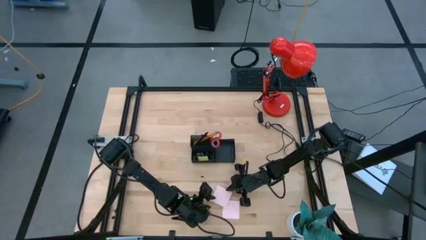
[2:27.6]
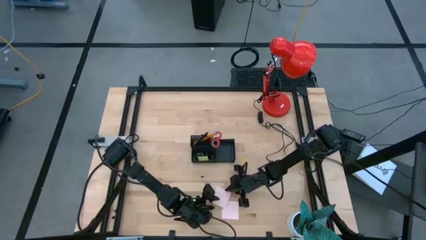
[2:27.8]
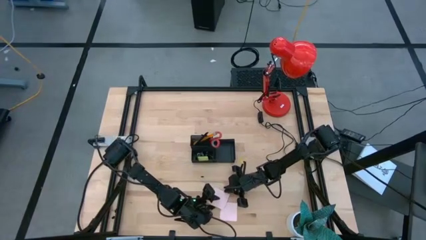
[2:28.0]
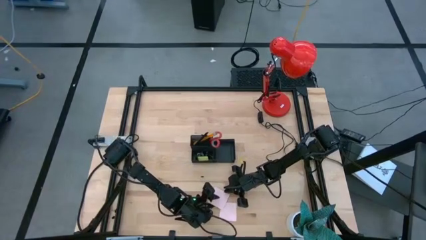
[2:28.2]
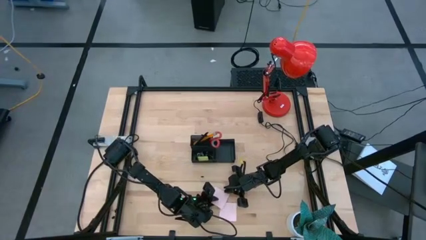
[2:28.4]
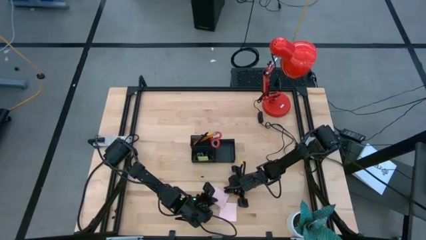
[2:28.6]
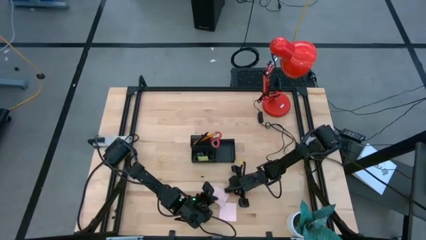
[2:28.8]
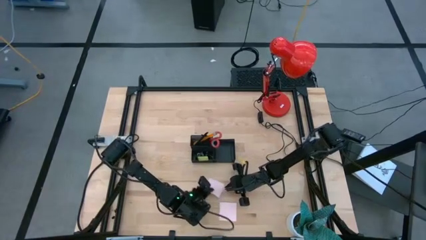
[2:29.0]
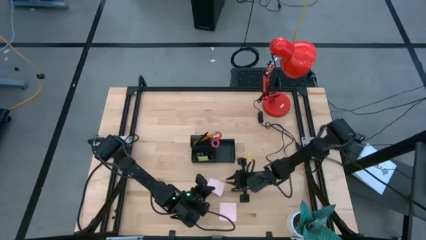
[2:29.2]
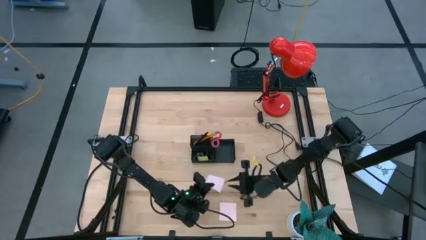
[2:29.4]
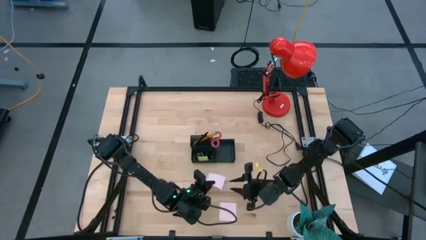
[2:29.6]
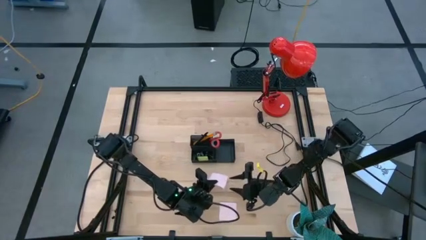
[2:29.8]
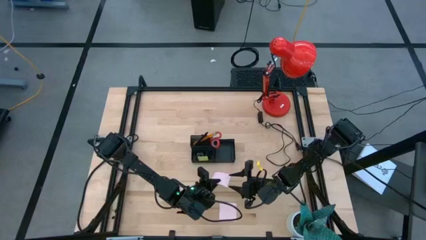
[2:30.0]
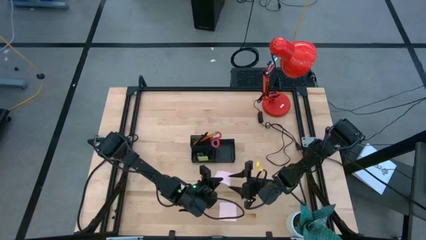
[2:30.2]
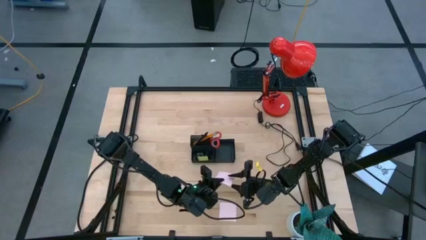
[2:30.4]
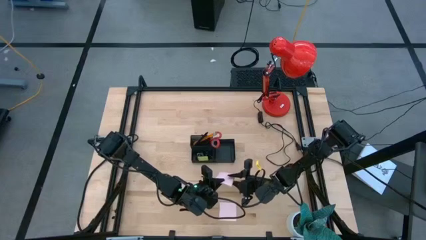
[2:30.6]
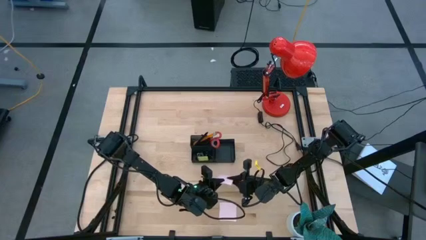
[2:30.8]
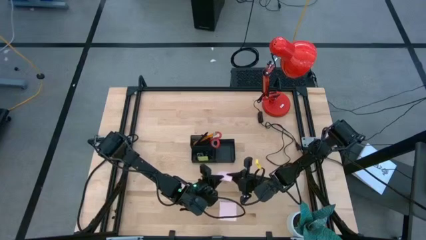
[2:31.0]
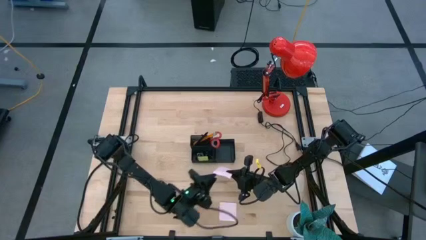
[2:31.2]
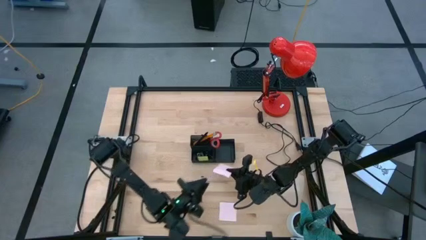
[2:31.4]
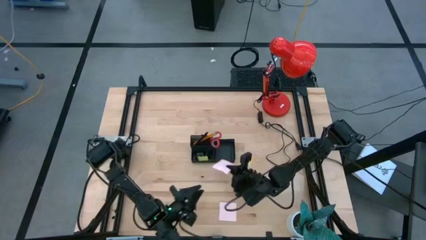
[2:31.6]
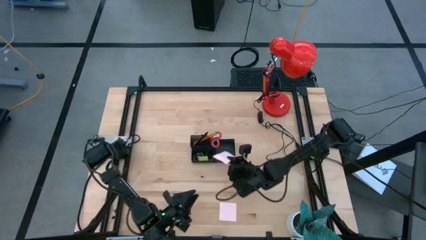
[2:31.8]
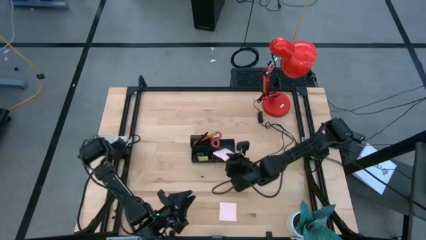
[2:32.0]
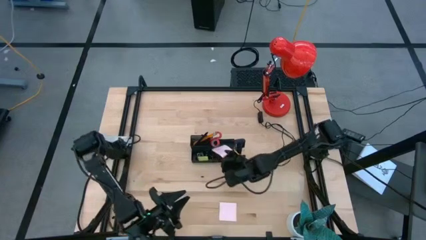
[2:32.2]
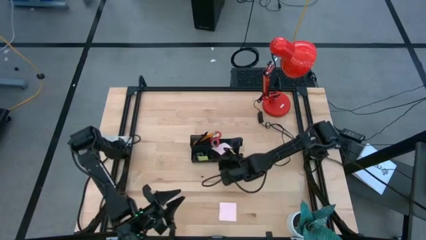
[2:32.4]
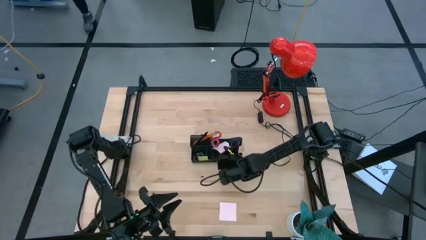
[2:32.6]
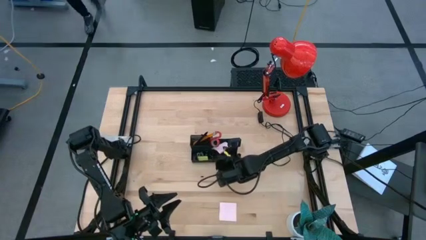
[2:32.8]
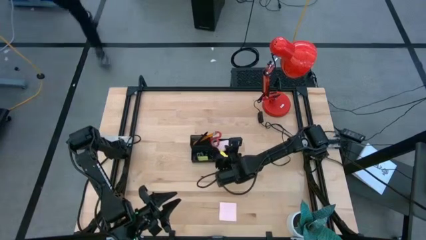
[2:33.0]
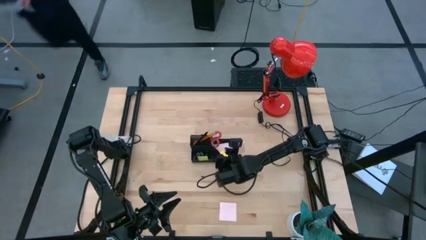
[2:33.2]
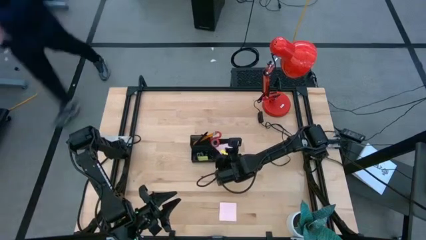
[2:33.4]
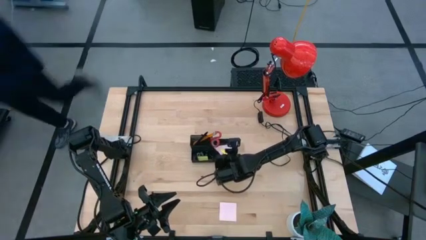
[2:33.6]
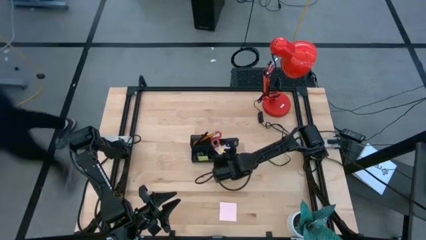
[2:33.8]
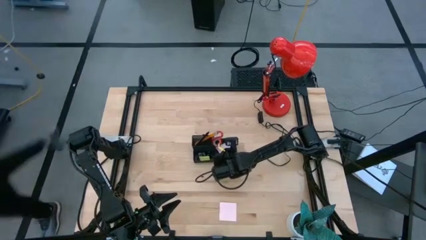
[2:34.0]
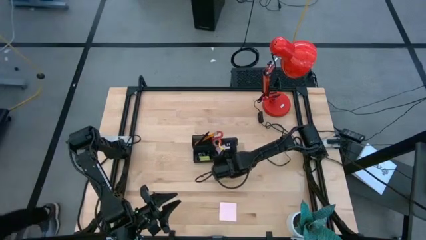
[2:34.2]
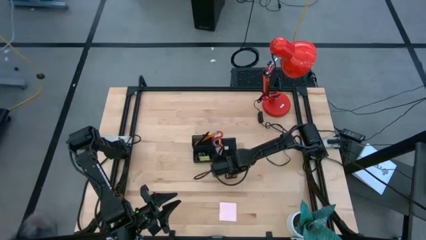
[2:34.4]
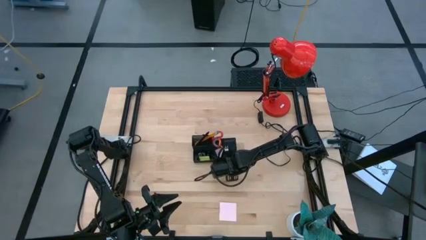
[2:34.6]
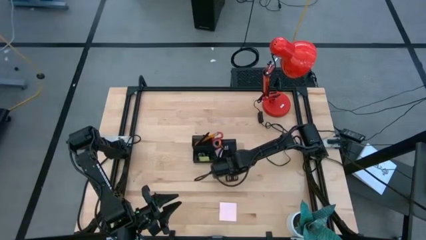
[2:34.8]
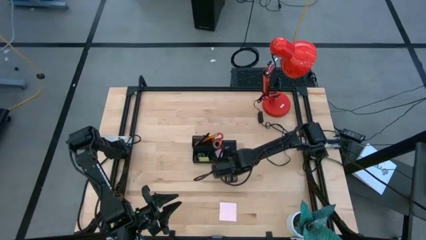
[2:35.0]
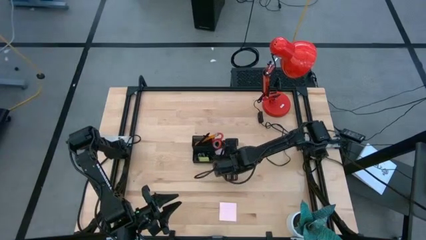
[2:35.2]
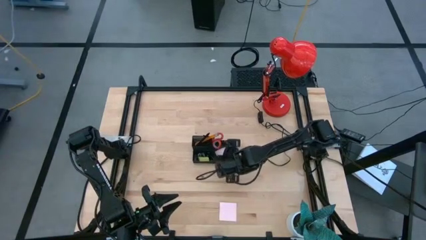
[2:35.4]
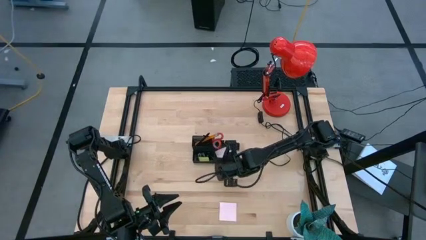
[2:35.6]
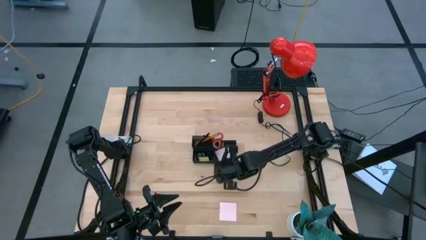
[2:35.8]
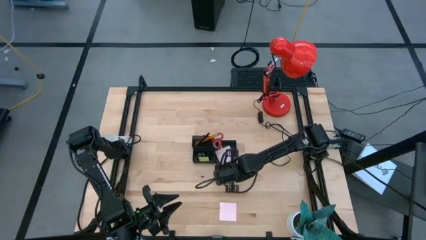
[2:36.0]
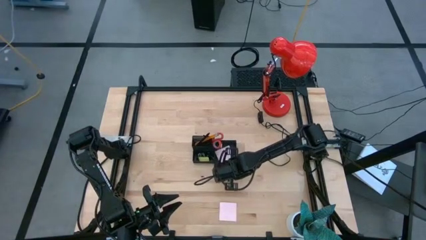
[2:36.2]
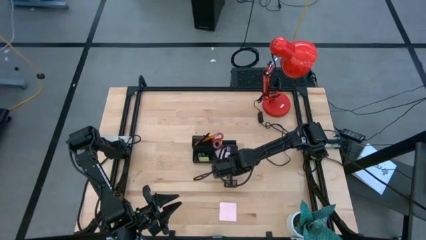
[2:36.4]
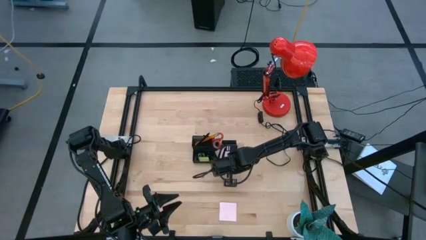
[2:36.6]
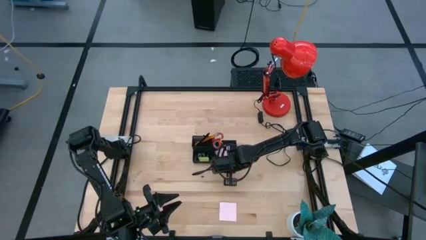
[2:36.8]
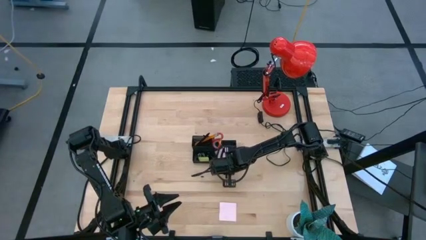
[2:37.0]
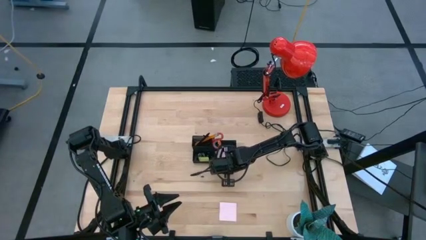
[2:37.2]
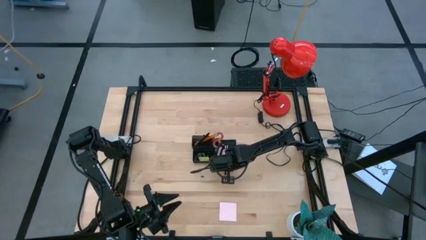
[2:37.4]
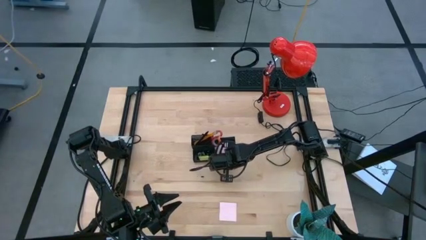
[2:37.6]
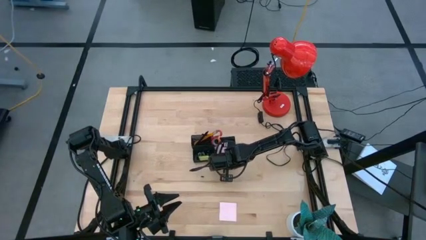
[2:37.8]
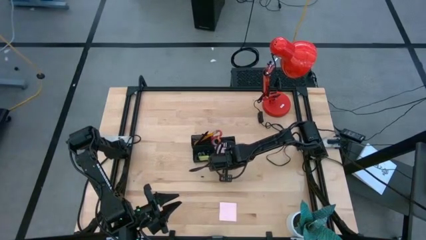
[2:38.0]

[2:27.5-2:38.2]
Task: Pick and place office supplies into organizer
Put the pink sticky notes into the black desk organizer

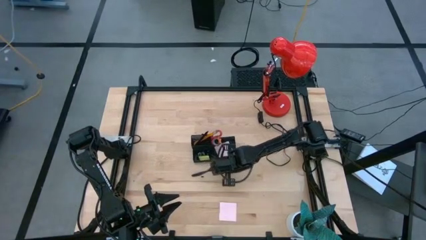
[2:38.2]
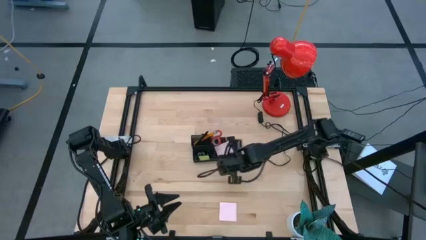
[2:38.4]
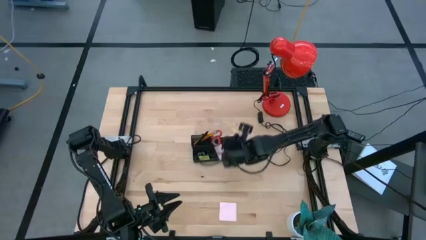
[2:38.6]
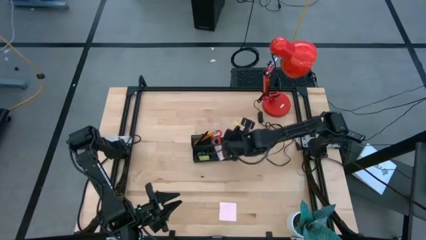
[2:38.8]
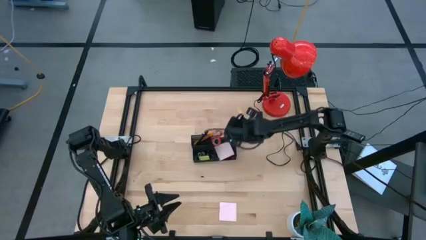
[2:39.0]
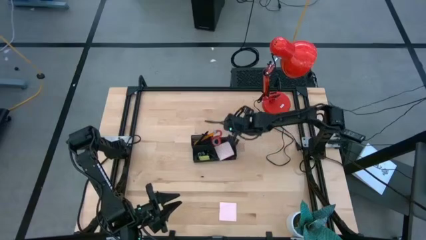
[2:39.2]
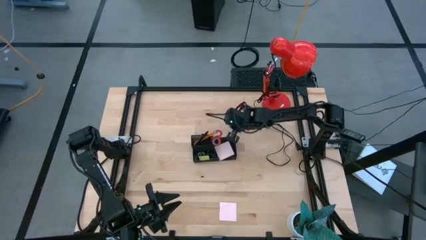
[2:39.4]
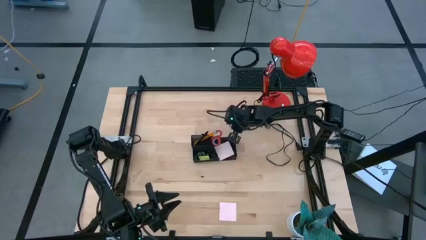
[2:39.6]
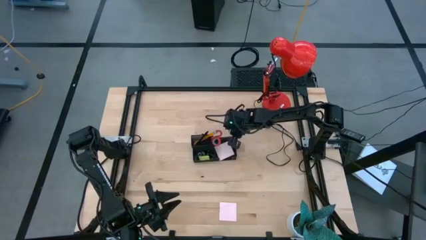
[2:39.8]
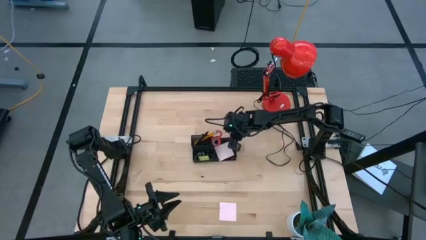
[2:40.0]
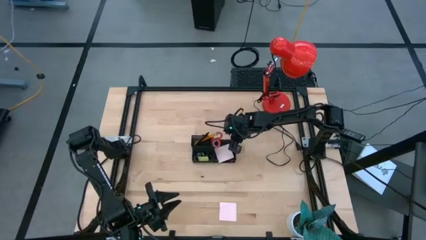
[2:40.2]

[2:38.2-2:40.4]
Adjust the black desk organizer

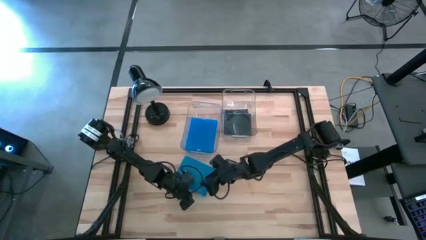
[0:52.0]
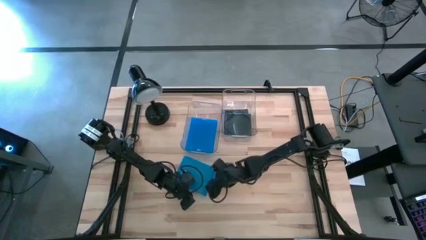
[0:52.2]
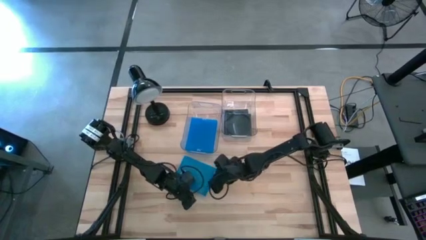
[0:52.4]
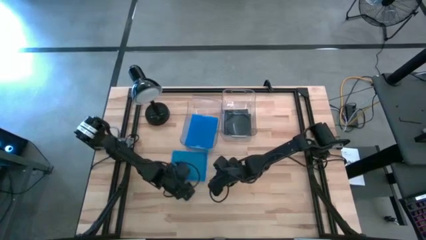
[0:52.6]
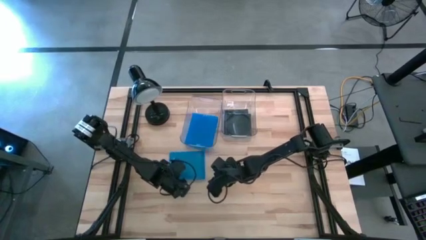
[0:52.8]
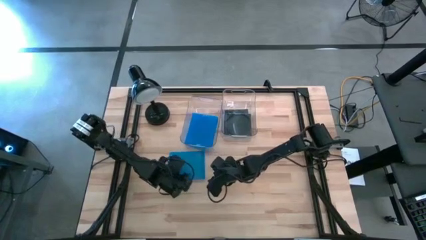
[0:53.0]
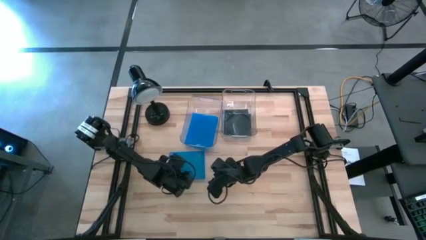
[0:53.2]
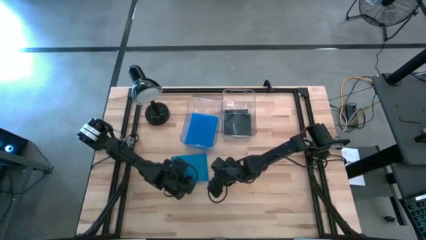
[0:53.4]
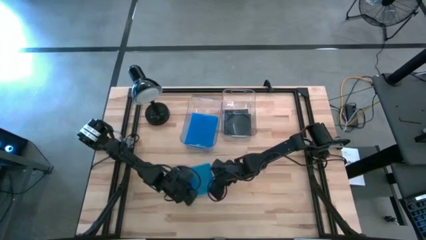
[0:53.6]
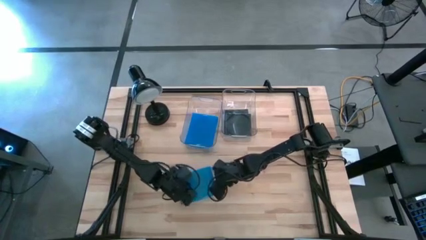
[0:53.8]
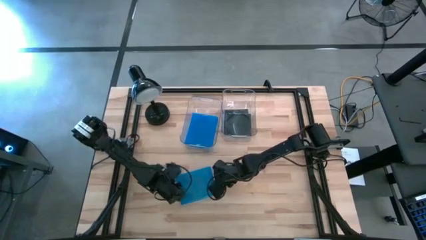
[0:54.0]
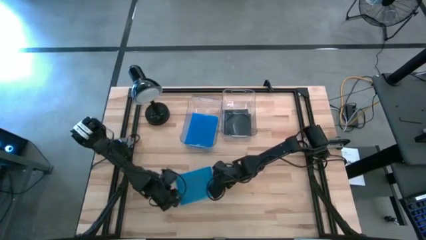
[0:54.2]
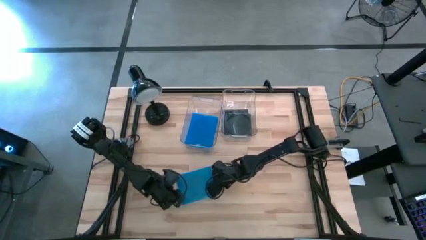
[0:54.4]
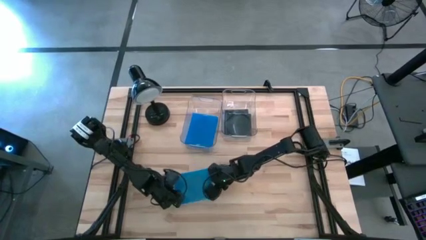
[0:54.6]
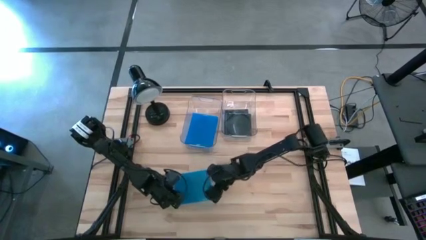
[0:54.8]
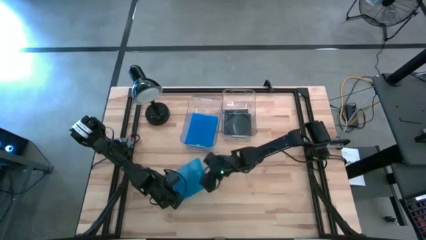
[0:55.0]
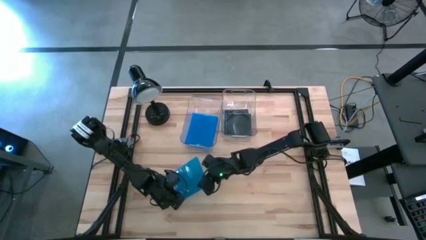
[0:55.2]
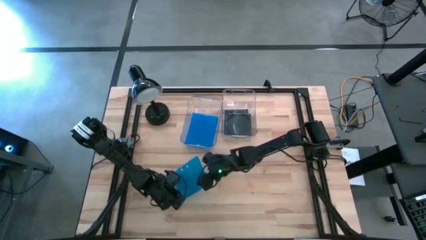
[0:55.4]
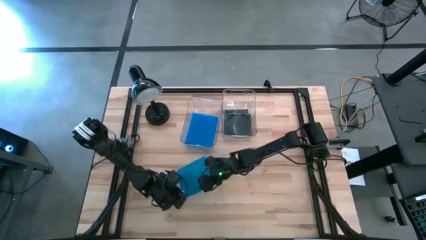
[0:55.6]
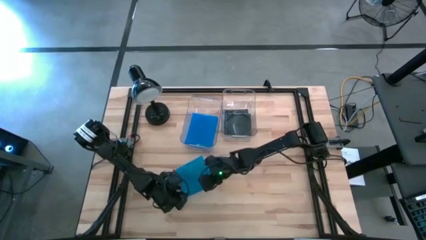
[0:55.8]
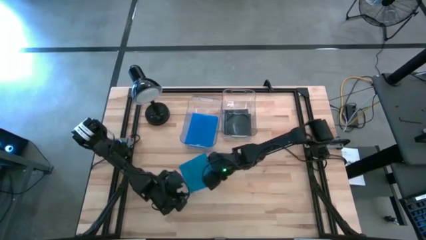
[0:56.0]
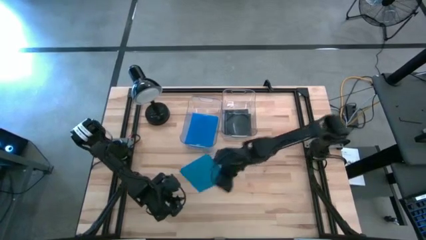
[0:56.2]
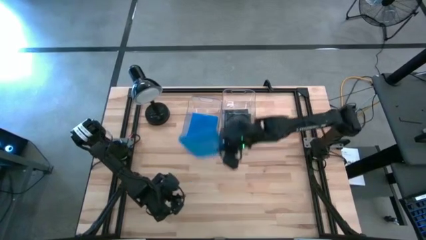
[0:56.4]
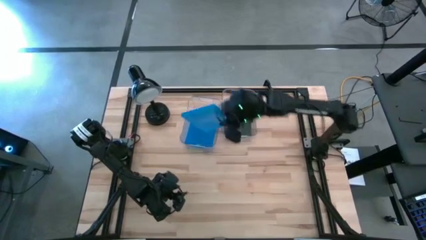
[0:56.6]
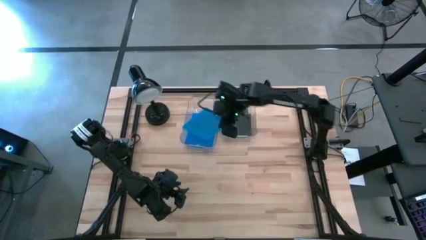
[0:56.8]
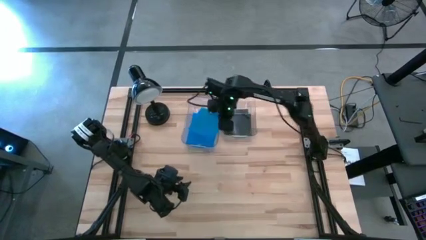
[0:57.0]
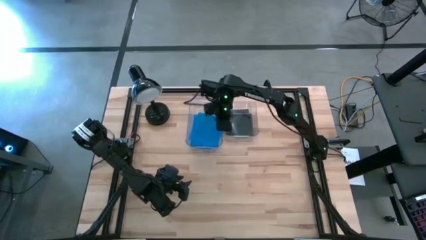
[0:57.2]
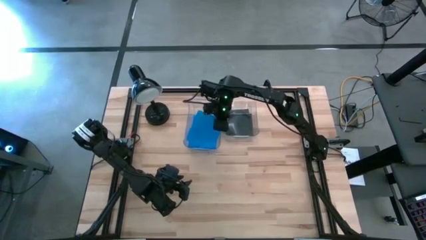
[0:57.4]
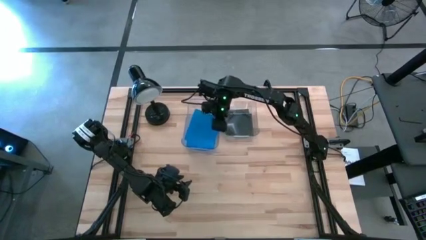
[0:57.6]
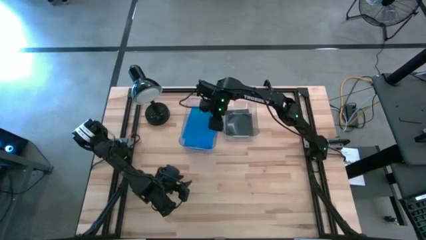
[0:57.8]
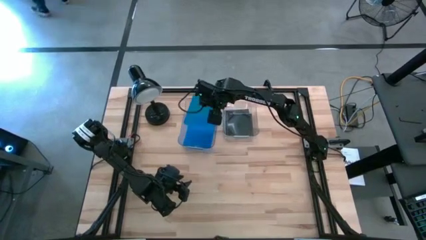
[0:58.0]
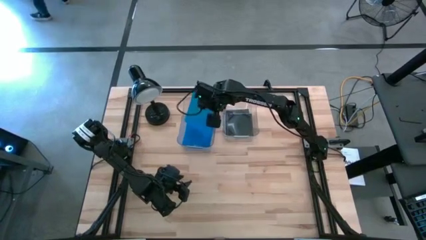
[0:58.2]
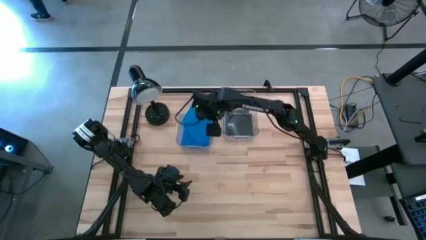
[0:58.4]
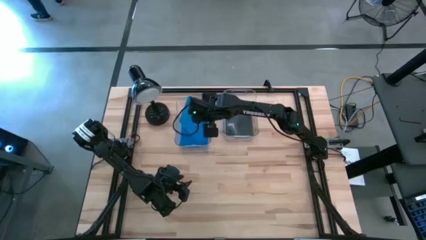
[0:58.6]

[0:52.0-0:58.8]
Task: Pick & place jewel cases by type
Put the blue CD case into the left transparent bin
